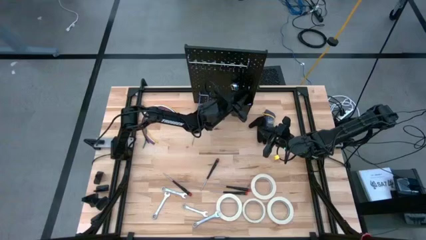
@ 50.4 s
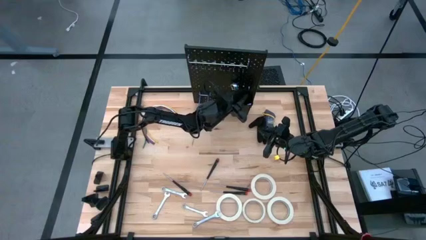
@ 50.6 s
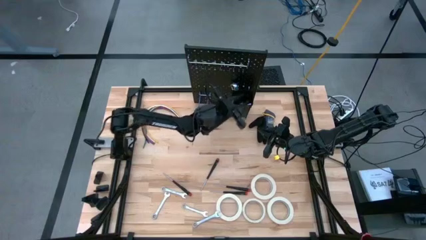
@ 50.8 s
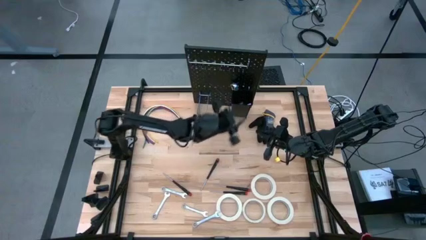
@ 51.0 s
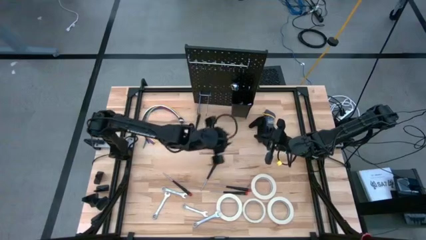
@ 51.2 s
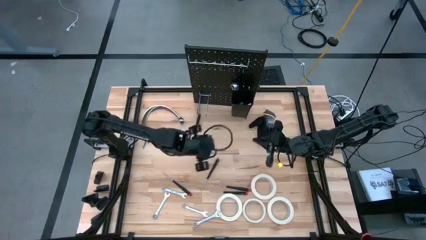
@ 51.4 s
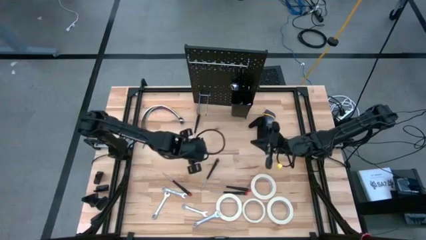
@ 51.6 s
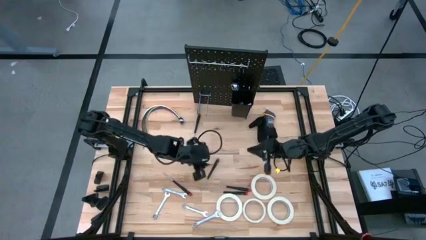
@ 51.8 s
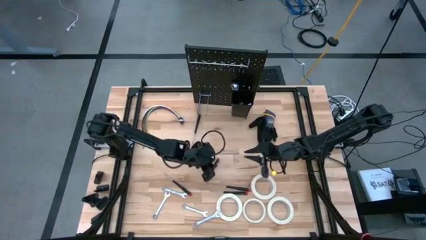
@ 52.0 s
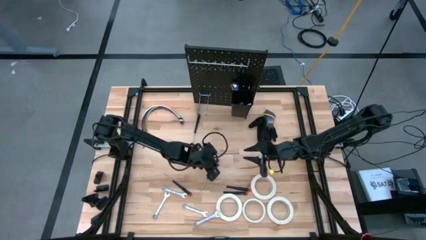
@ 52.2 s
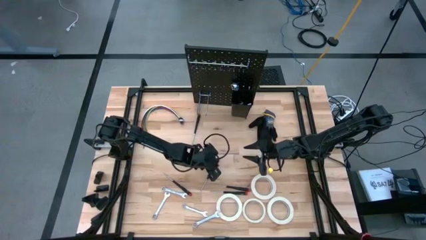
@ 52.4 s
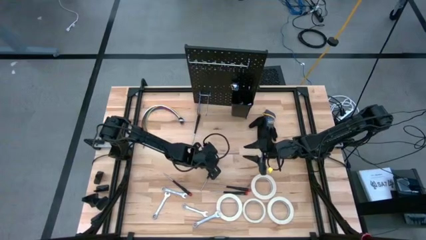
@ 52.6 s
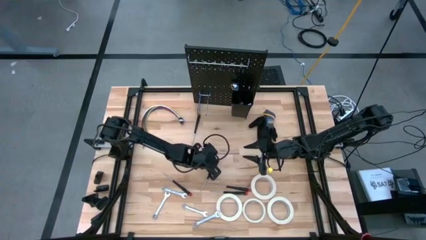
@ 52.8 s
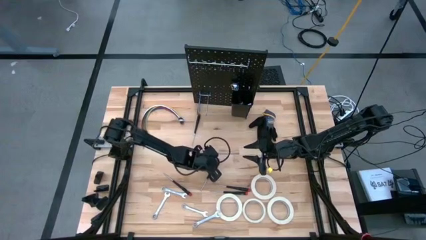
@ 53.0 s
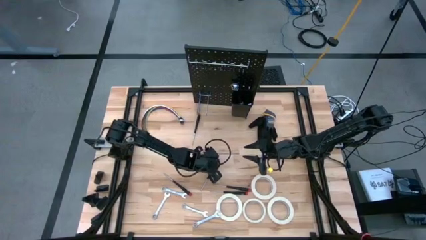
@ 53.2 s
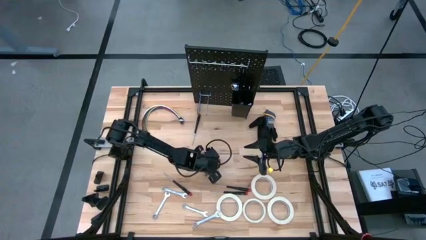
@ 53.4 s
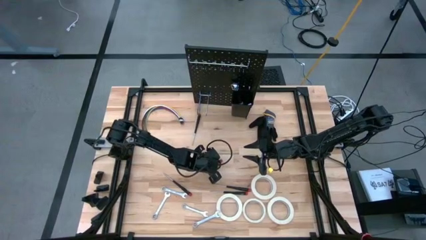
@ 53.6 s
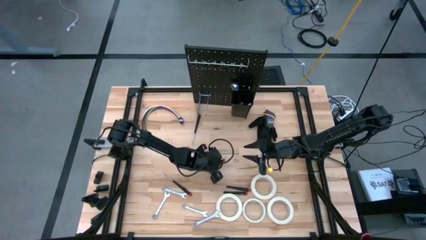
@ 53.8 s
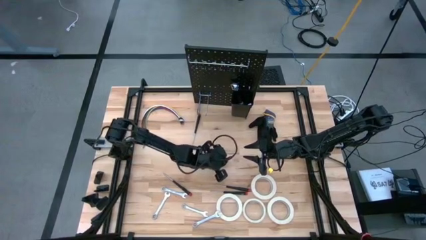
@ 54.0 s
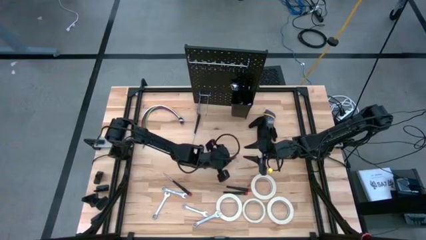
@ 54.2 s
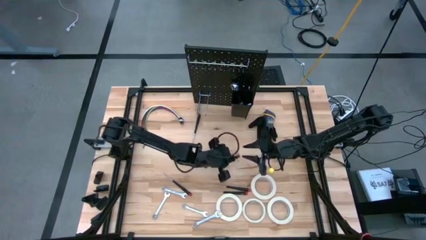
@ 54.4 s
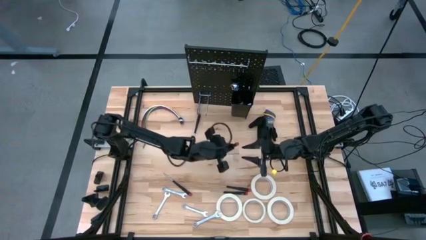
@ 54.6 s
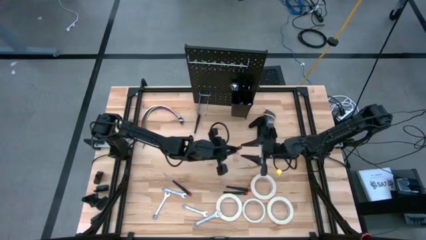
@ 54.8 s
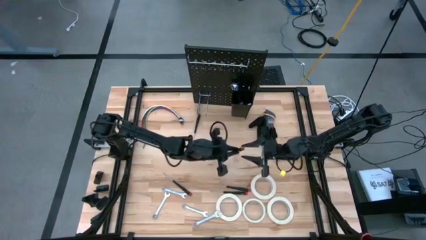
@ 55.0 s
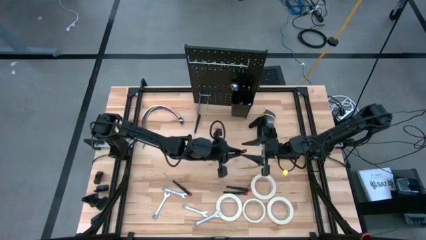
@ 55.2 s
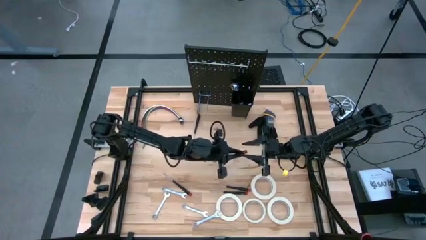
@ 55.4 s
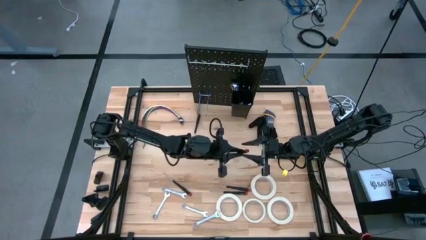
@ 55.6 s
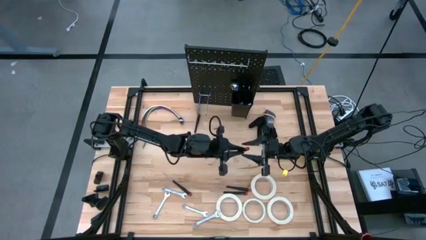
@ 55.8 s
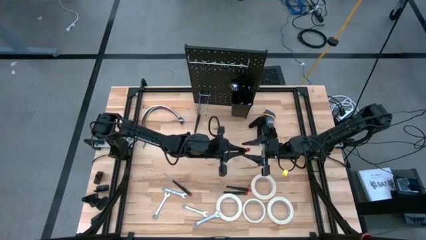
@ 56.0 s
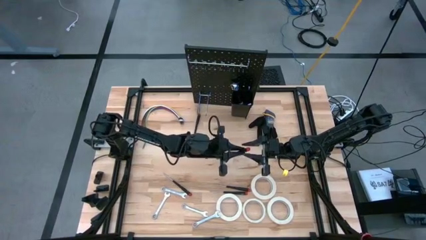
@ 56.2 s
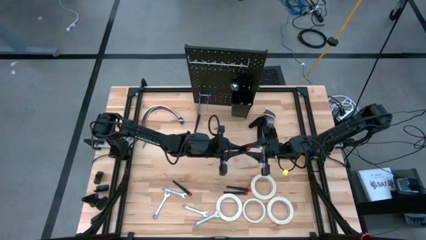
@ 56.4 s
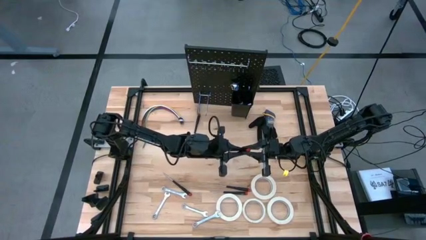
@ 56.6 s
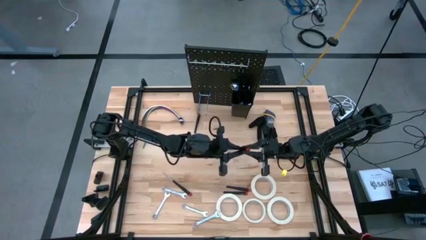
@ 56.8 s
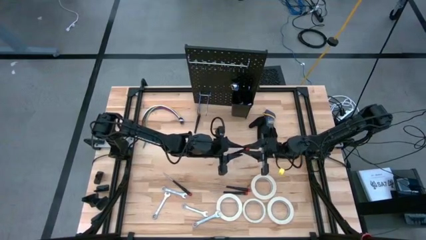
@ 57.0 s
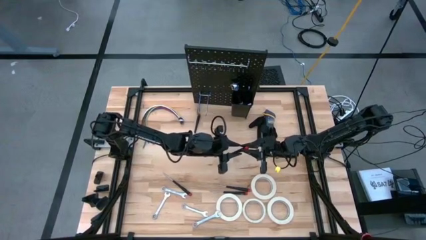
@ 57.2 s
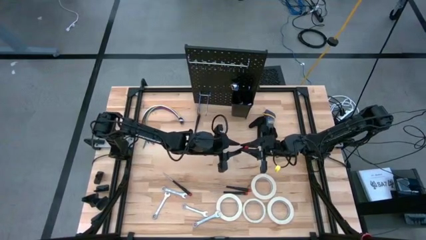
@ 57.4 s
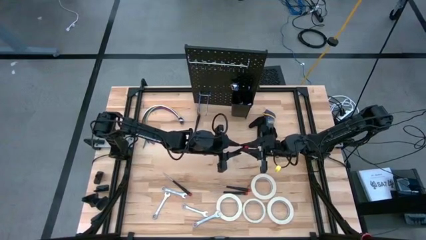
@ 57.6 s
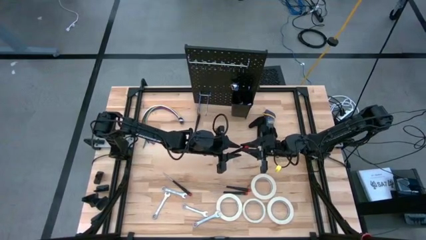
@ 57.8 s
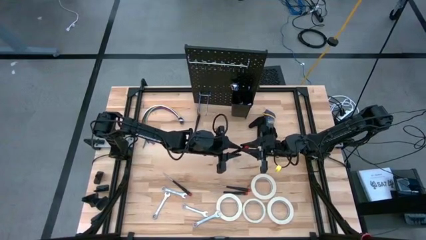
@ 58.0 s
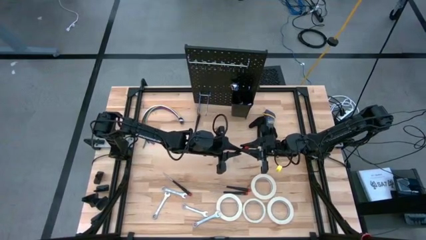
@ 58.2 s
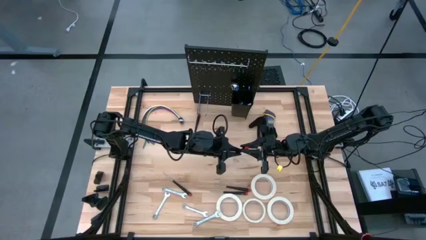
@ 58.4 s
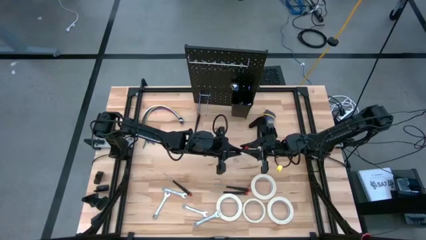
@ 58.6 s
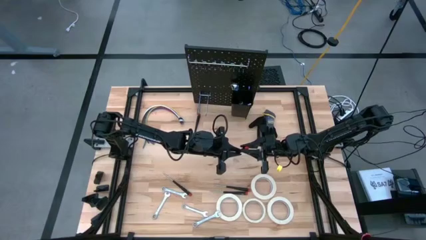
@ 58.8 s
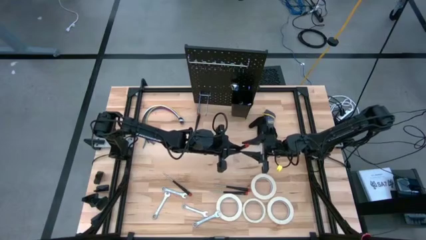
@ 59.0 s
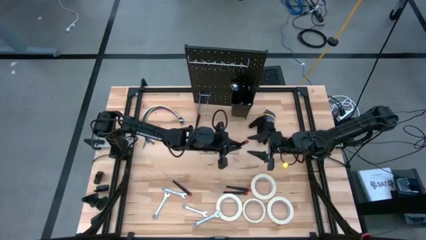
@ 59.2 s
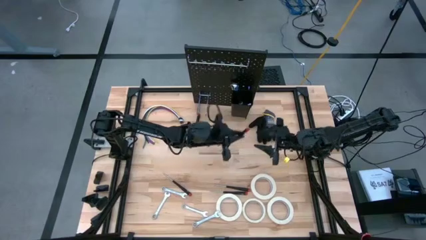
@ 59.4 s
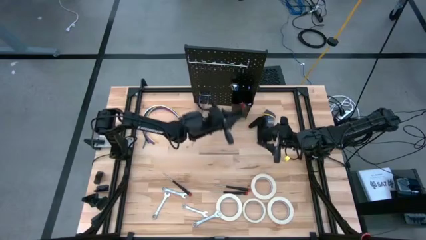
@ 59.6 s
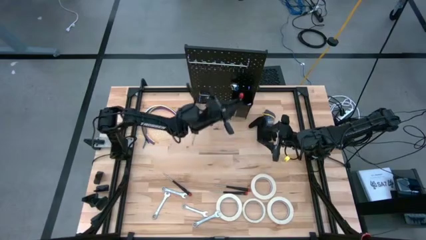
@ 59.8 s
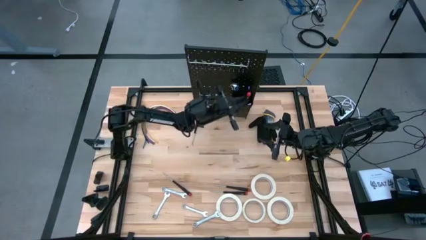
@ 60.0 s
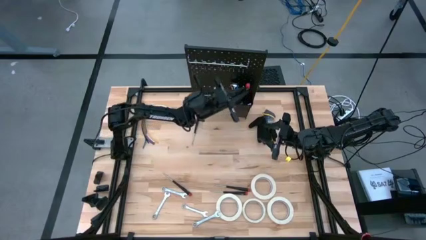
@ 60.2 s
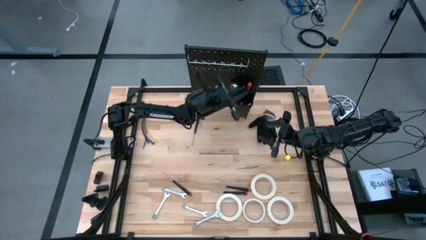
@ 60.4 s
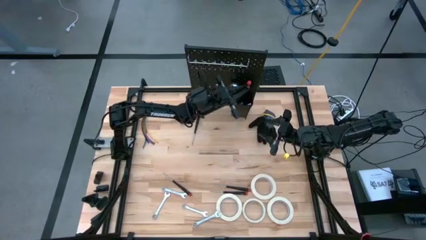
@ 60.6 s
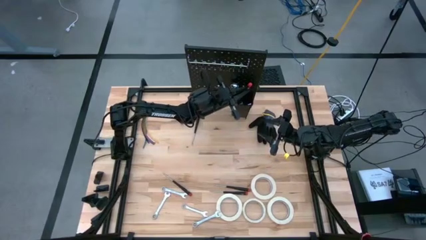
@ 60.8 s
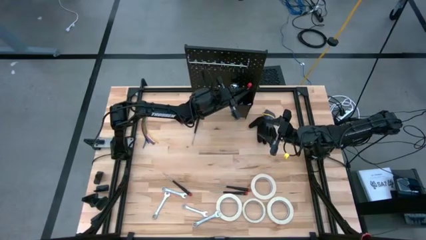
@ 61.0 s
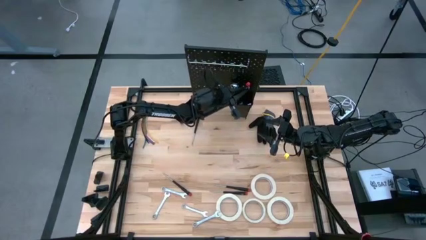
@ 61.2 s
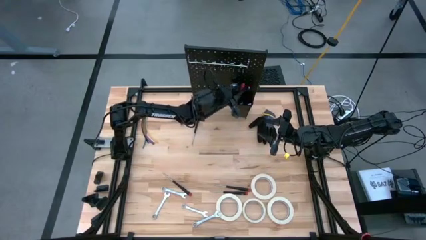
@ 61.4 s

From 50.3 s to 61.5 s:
Task: Hang tools onto peg board
Put the black nut driver into the black bin on the peg board

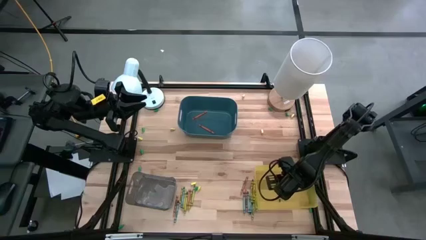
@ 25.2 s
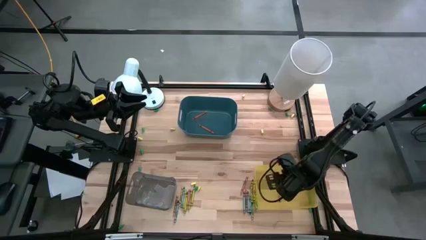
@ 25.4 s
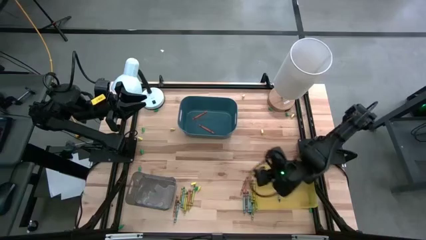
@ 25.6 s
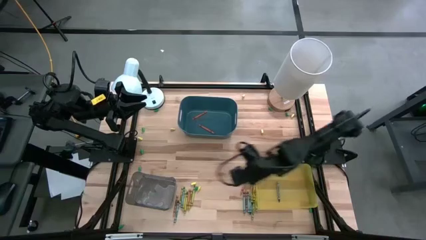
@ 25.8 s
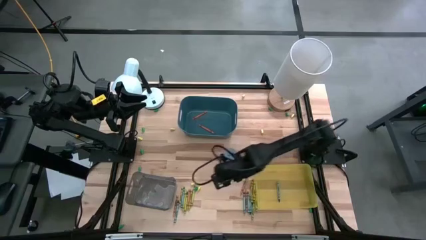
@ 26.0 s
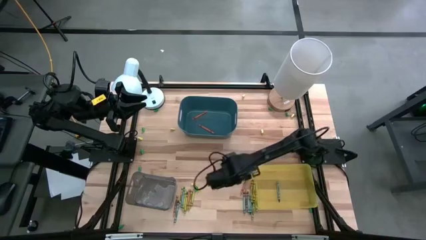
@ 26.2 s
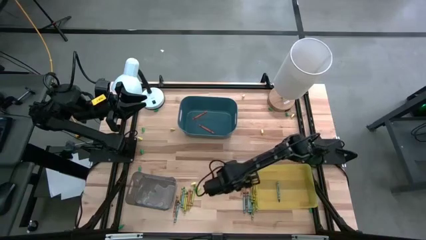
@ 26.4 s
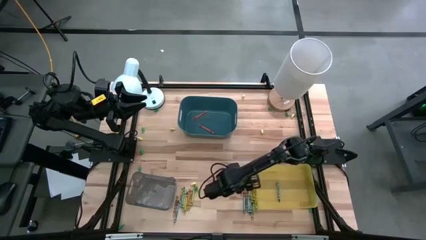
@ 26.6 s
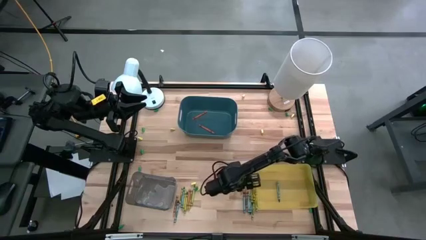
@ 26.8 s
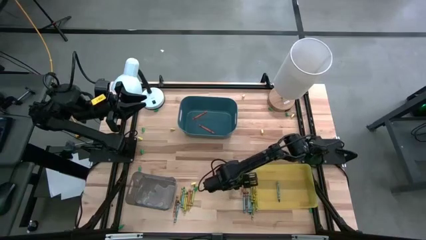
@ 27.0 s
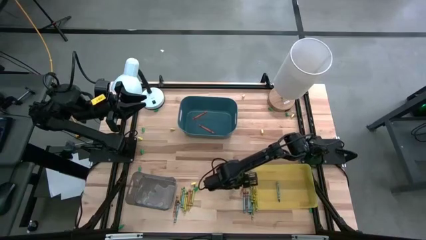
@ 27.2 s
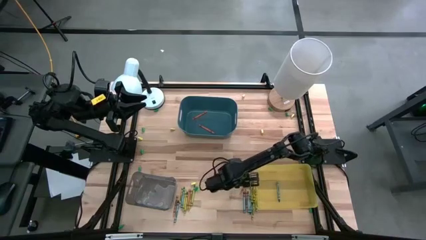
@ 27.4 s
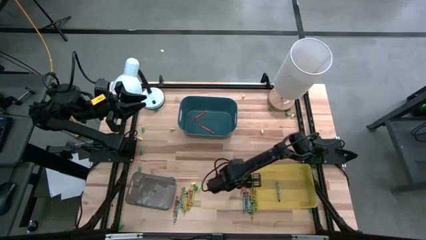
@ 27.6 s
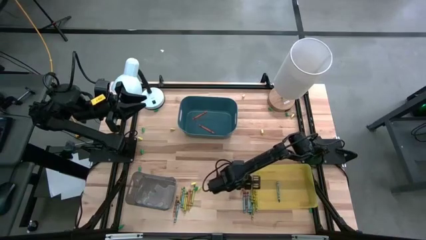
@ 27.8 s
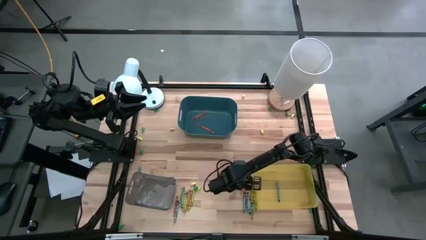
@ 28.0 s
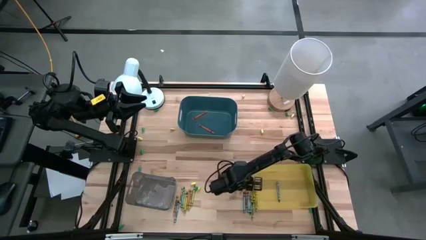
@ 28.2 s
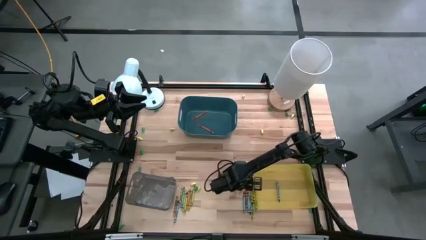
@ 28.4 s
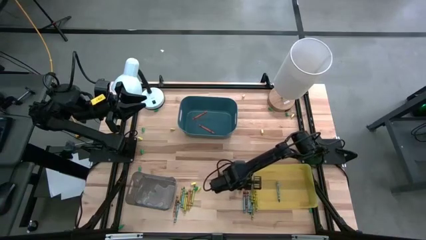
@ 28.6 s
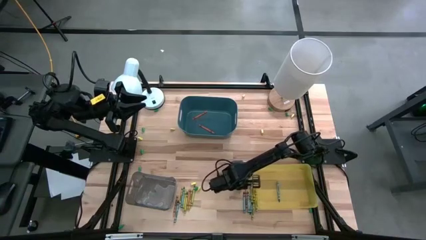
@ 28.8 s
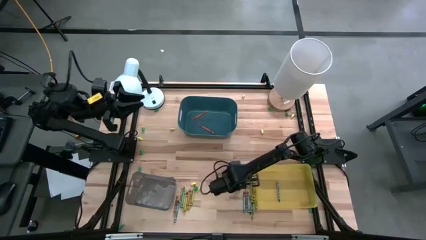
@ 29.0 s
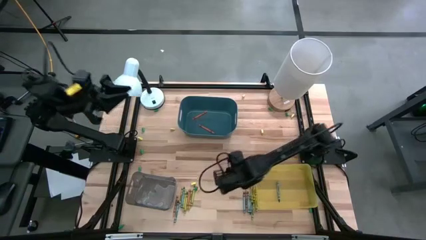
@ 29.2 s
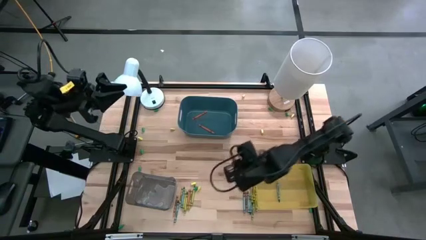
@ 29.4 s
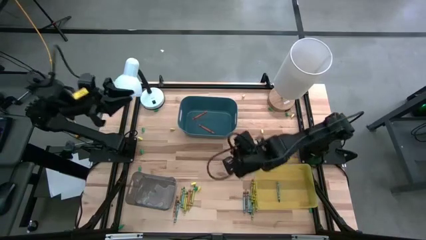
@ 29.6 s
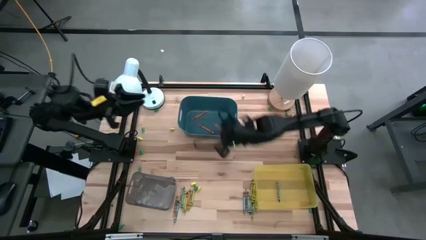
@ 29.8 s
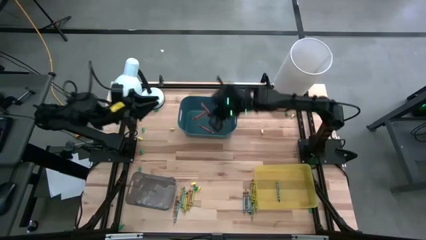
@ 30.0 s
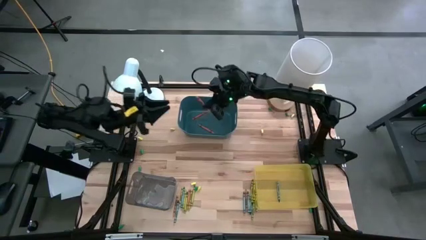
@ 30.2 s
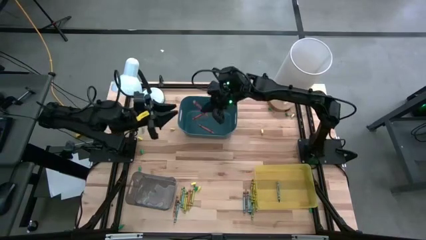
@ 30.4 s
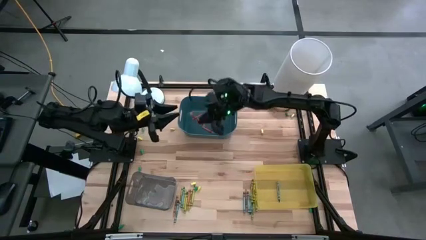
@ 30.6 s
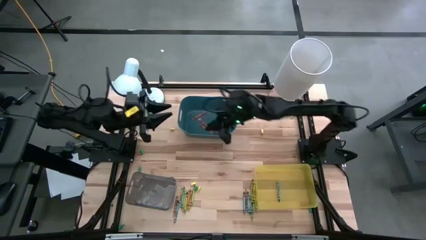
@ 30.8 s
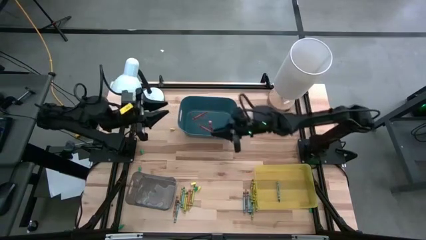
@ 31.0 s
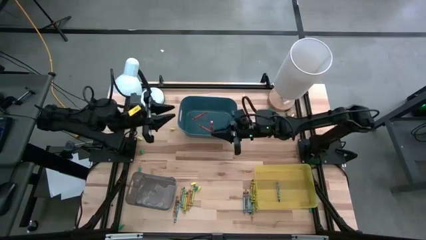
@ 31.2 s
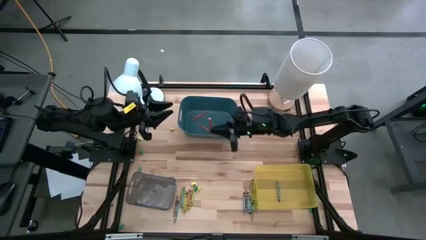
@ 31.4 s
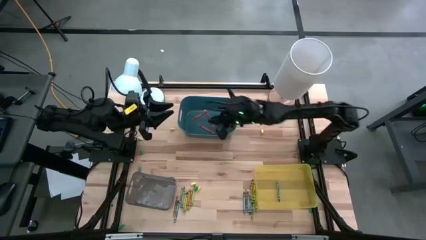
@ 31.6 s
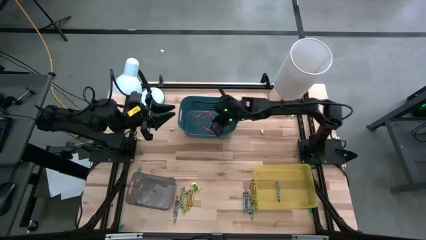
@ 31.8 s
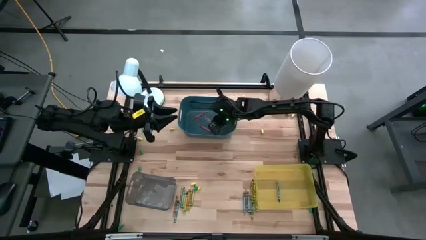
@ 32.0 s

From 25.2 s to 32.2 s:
Task: Sort crayons
Put the orange crayon into the blue bin
